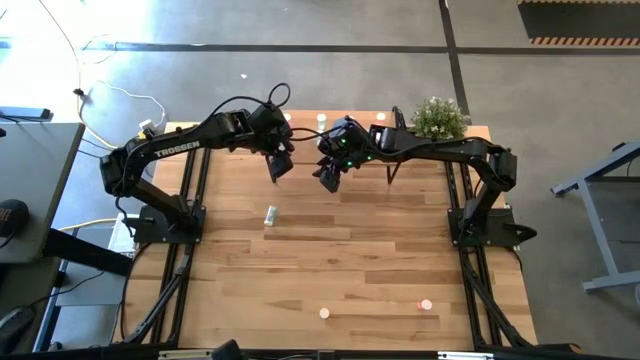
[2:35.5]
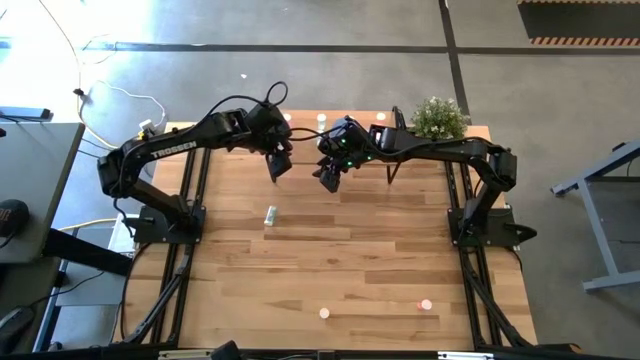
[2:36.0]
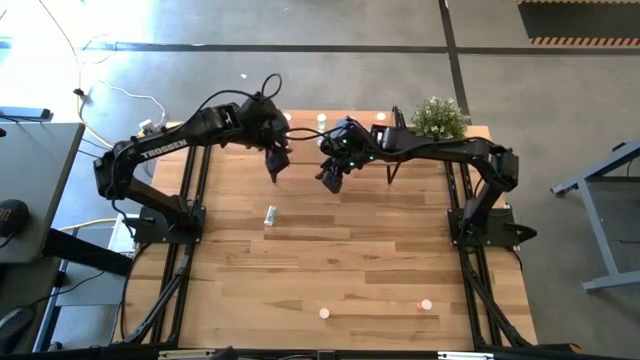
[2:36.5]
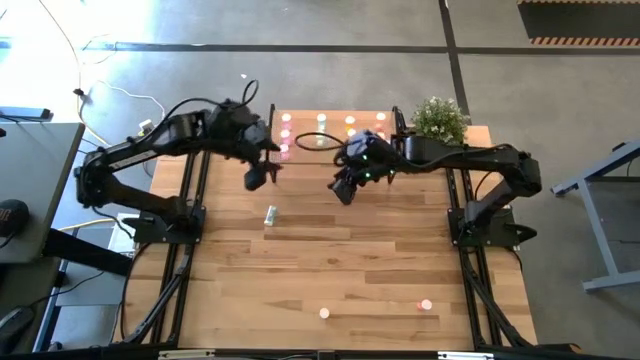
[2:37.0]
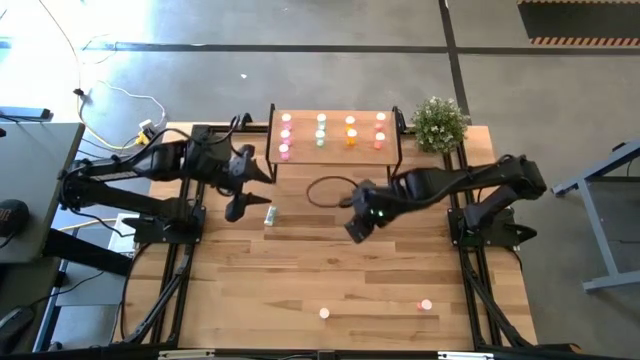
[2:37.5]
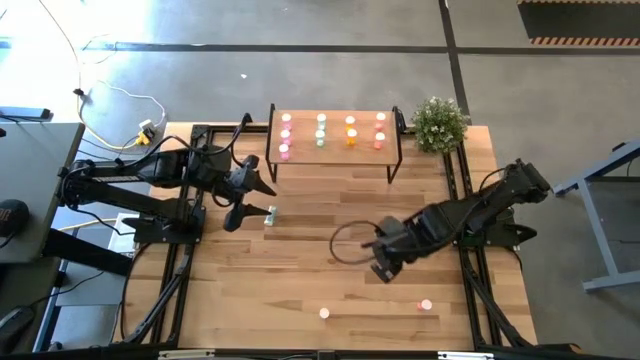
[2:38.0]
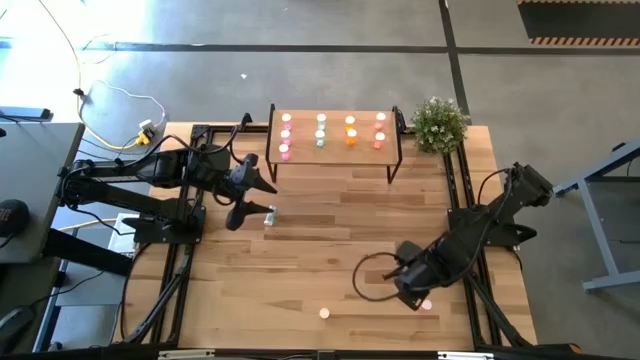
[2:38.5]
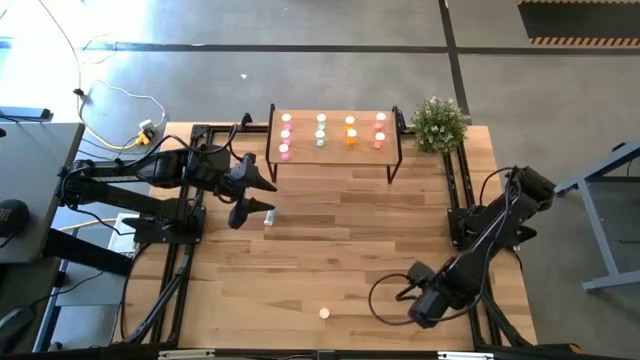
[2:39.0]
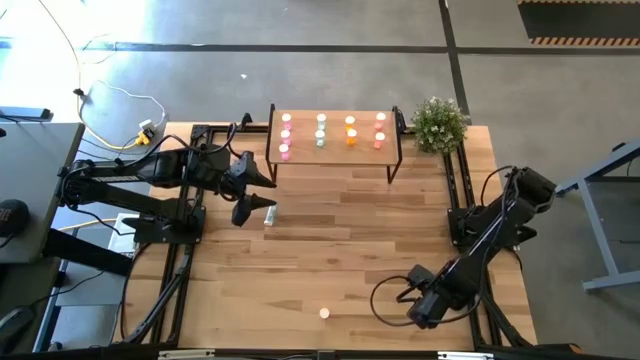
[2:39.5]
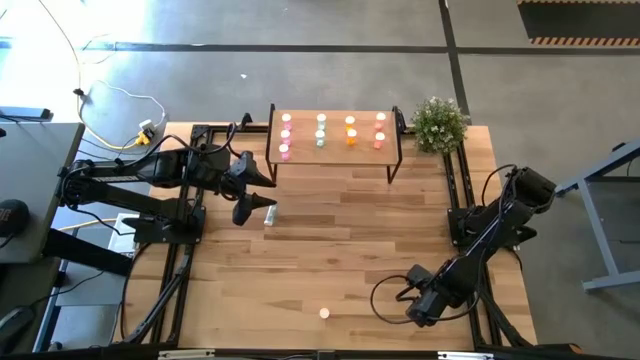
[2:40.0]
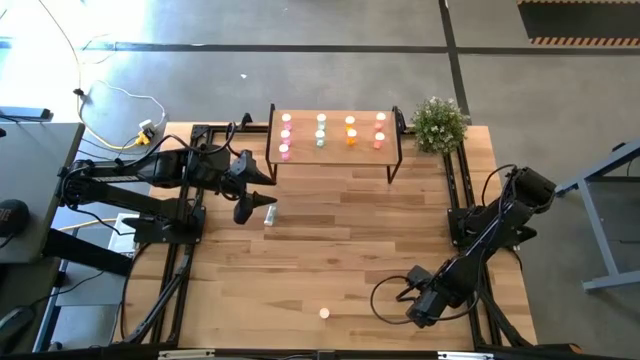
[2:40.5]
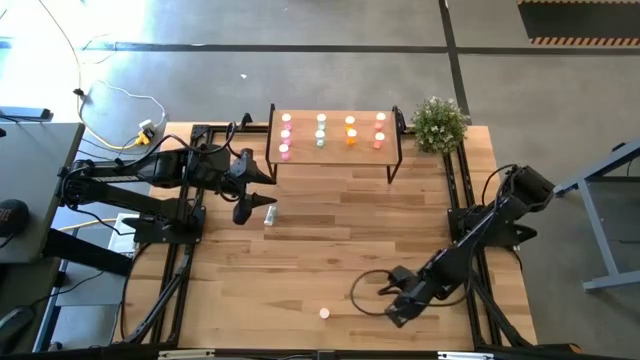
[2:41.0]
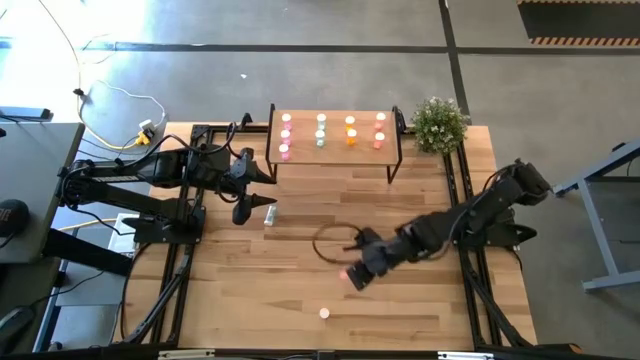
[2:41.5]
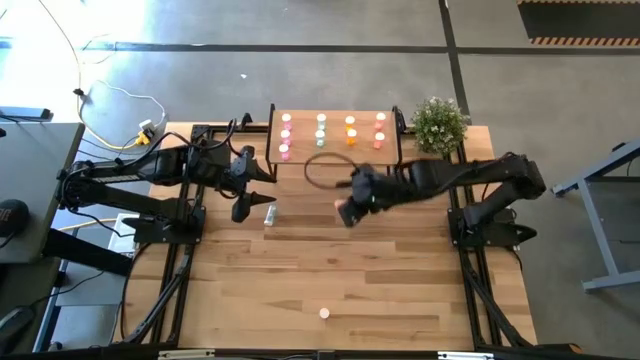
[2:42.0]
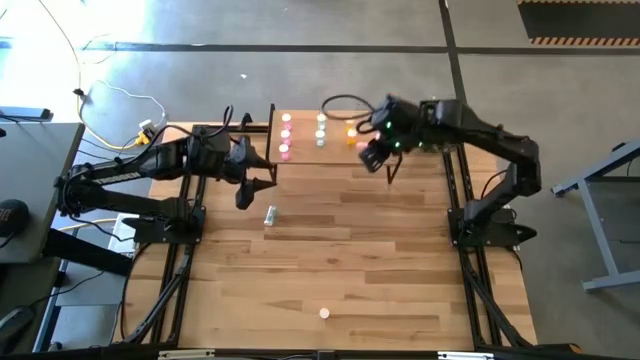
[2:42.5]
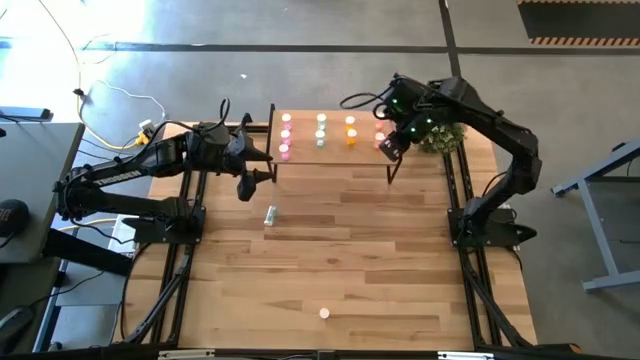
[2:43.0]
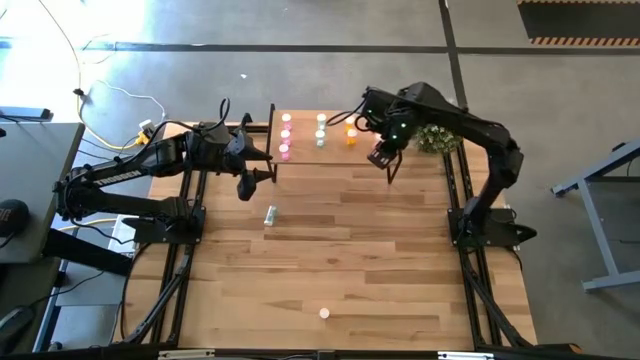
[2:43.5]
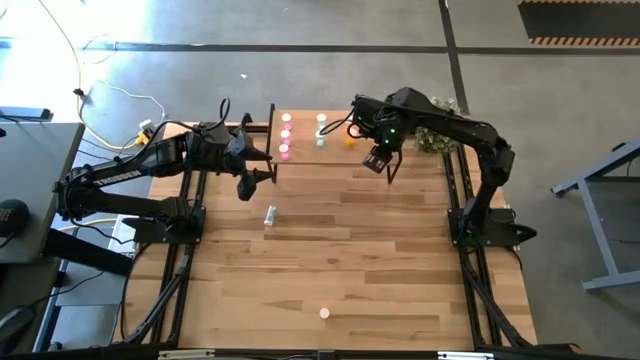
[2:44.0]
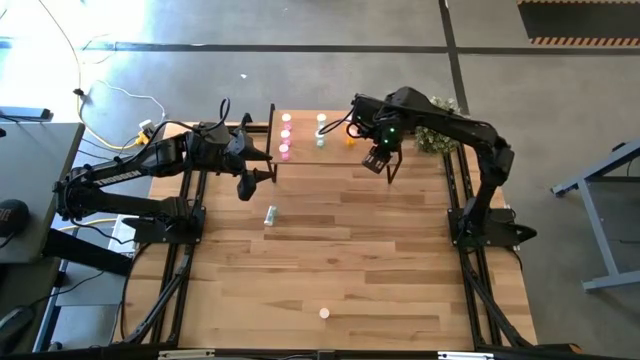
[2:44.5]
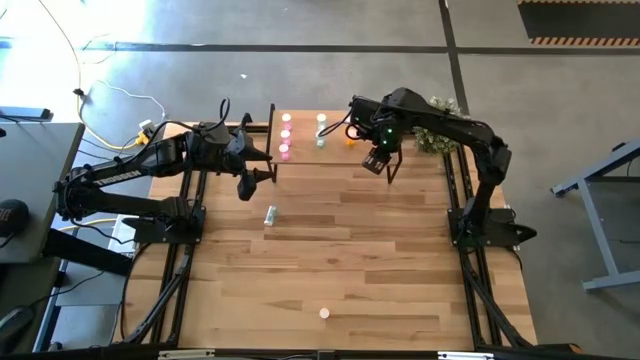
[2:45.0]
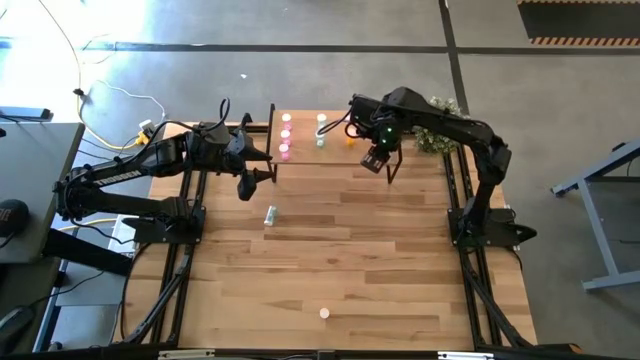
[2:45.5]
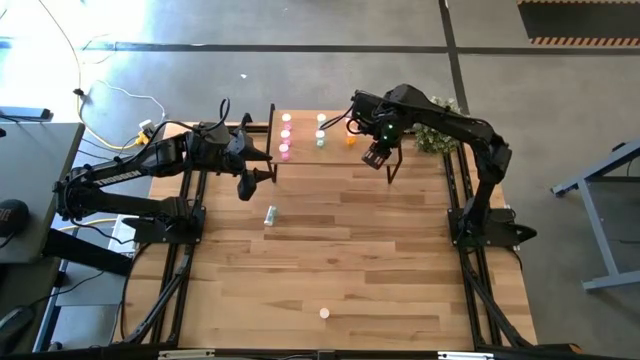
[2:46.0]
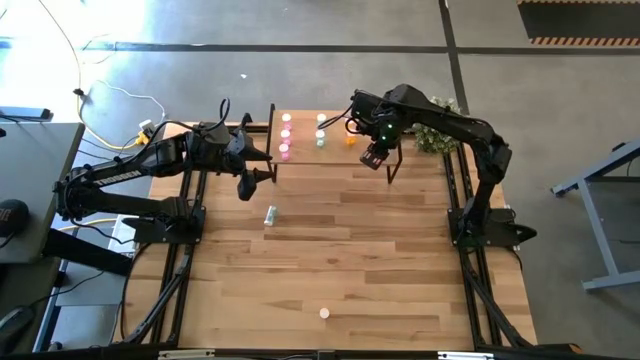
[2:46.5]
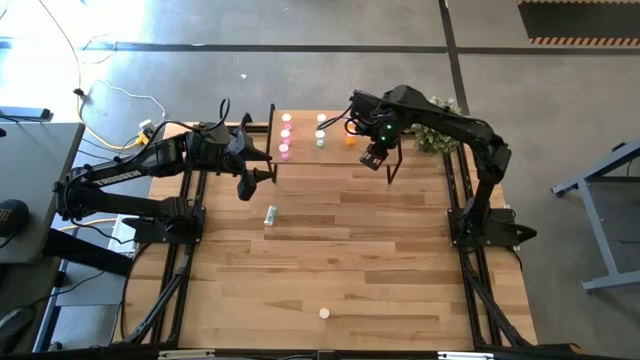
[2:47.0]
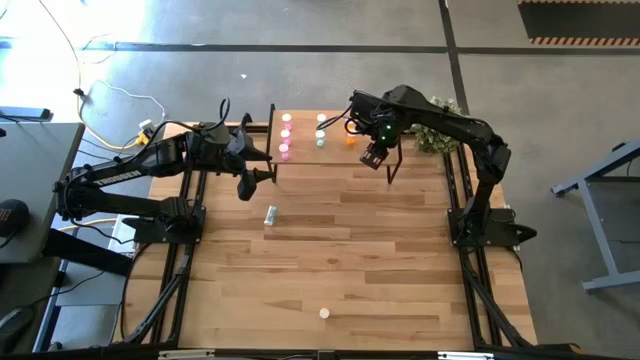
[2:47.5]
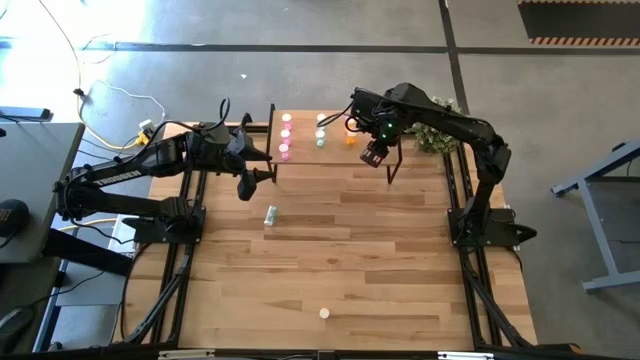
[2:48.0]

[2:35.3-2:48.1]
Task: Pick and place medicine bottles onto shelf by color
Put the orange pill bottle on the shelf aligned with the orange pill bottles

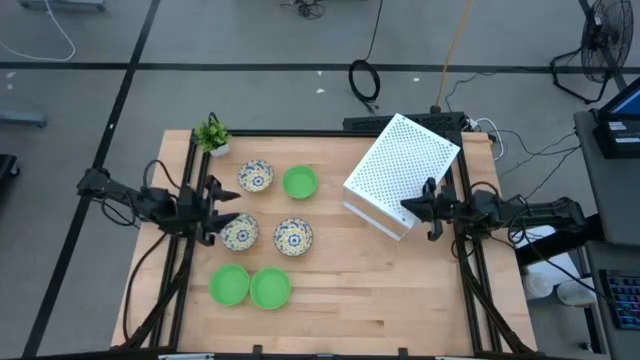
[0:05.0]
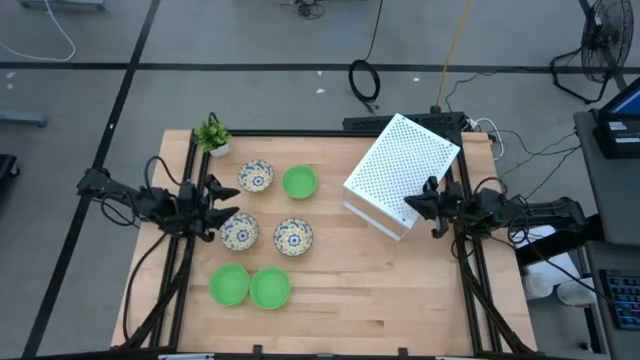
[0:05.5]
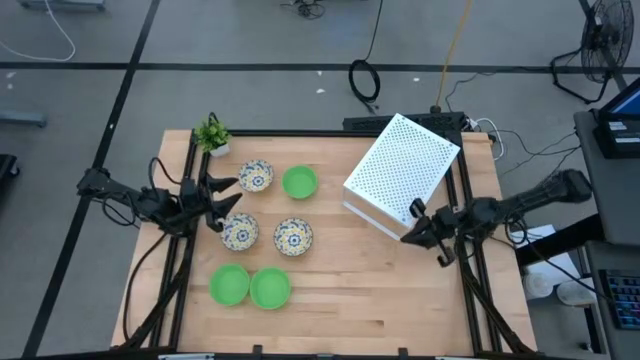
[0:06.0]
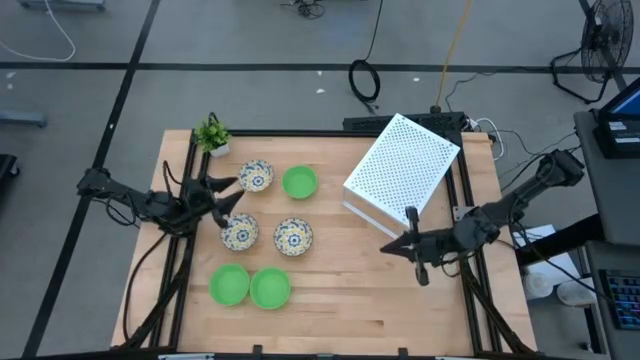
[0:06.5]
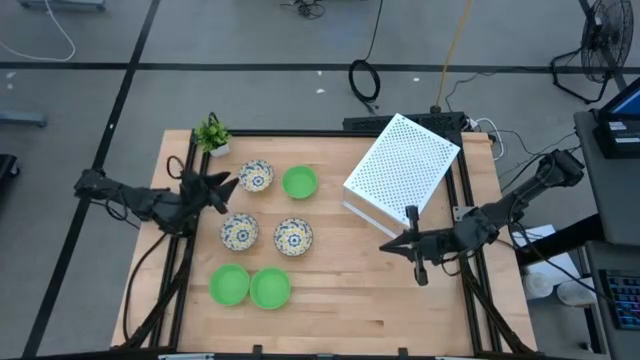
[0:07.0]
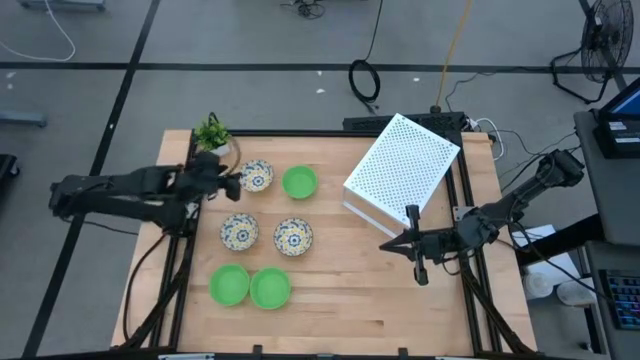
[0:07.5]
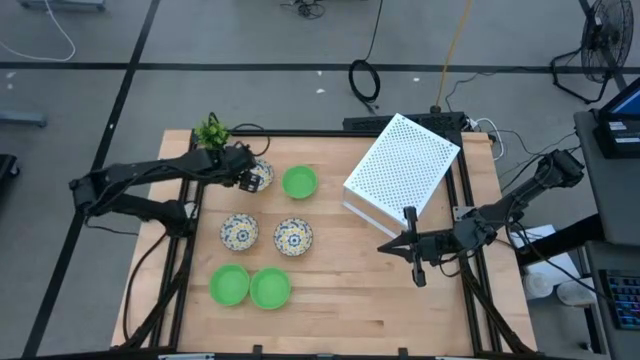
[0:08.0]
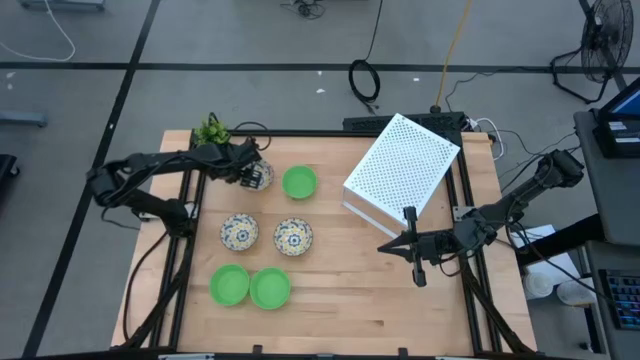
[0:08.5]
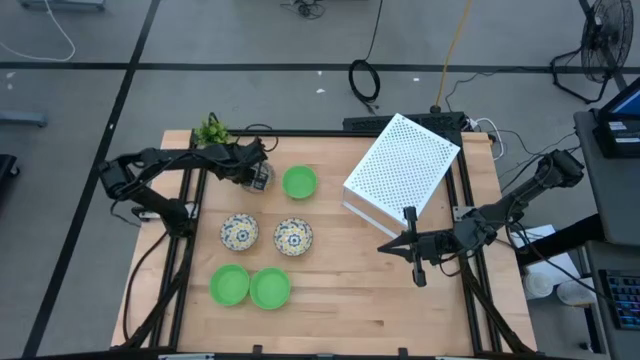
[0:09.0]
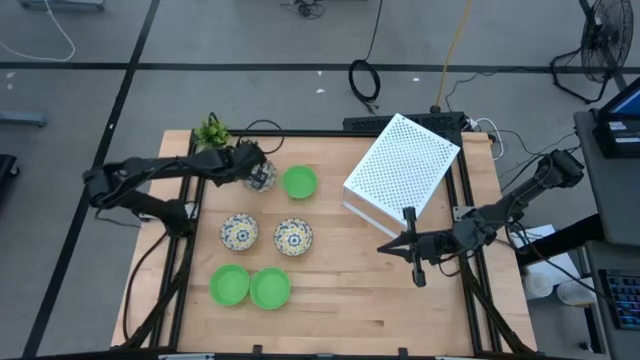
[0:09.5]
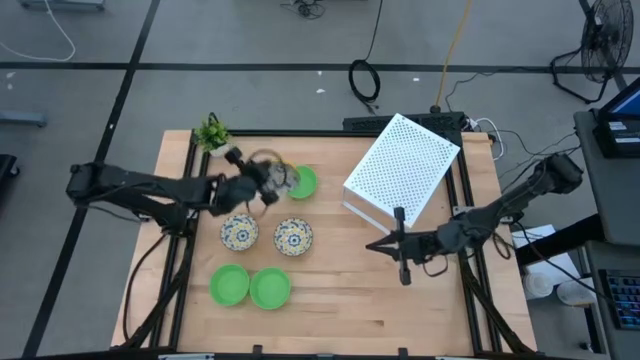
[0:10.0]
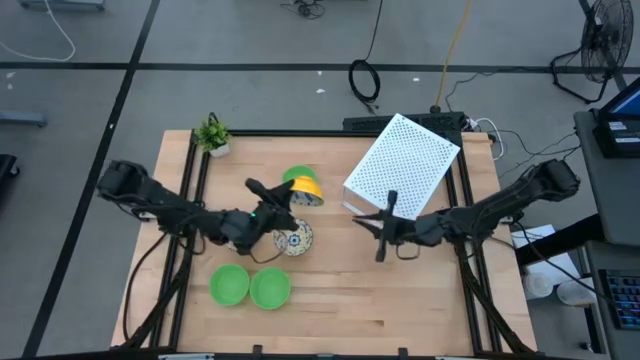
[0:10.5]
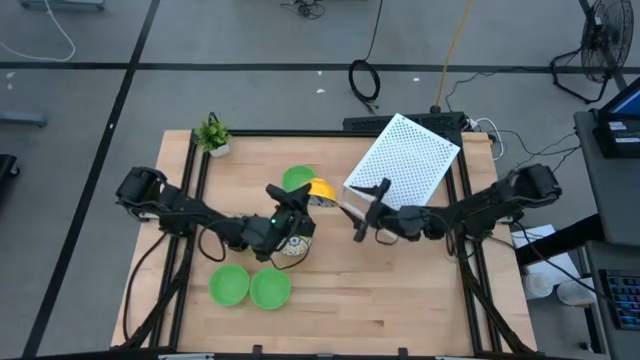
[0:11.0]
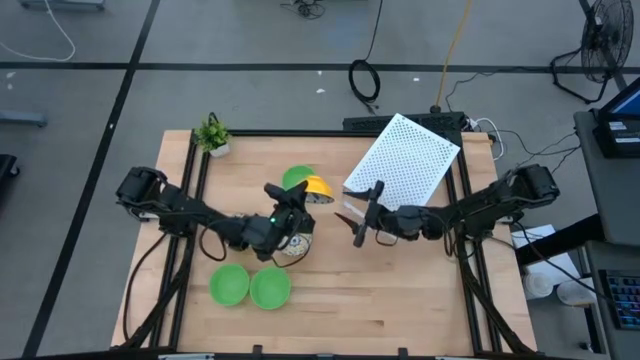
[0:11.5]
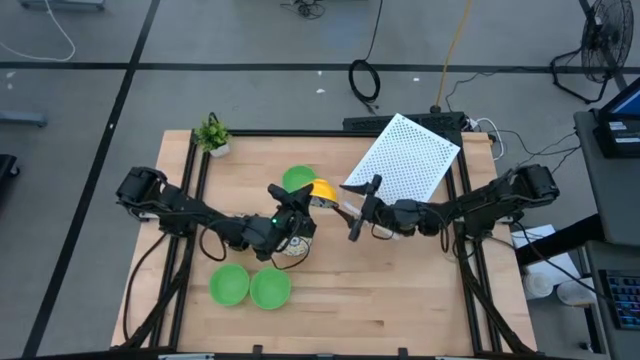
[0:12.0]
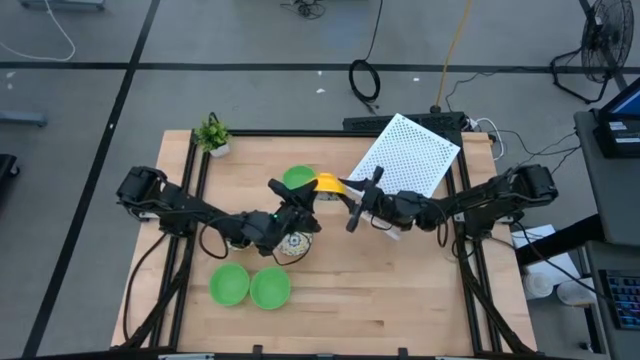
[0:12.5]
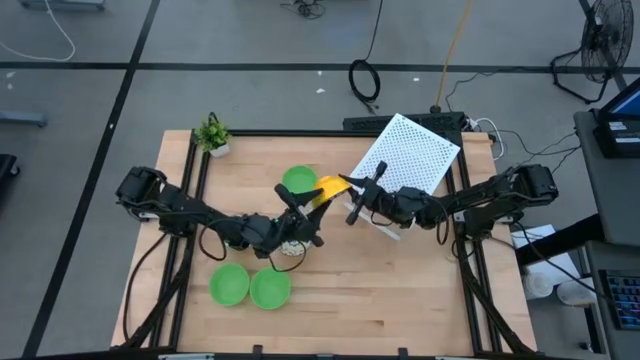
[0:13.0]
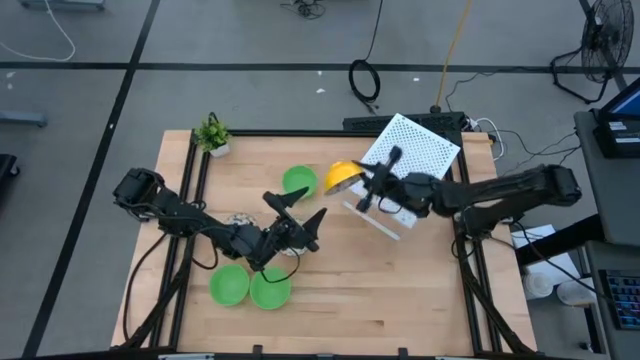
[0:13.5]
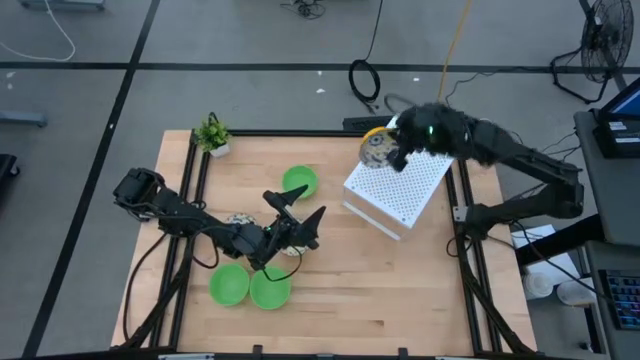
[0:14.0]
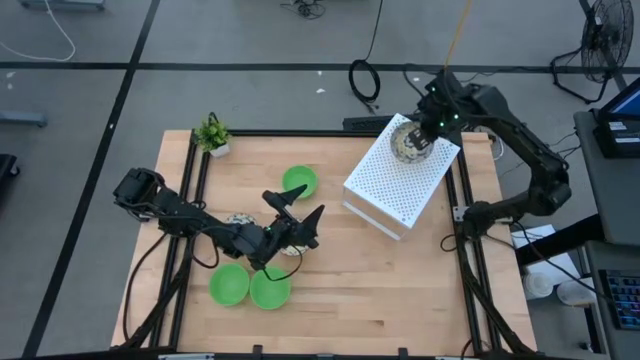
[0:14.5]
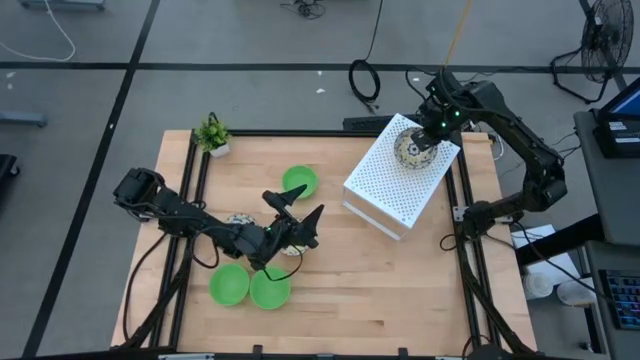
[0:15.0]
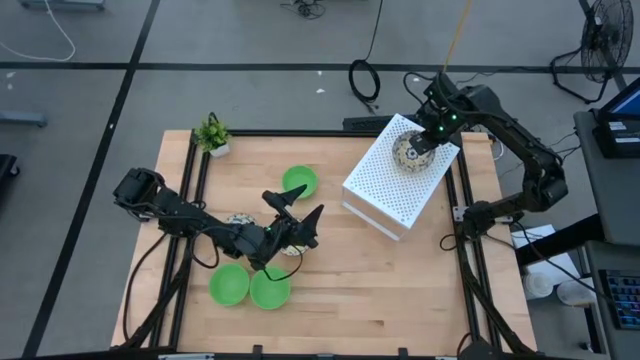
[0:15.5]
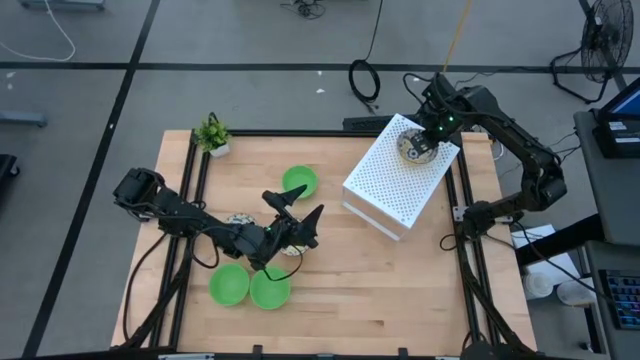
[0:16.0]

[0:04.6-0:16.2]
Task: Pick & Place Mini bowls
Put the top yellow patterned bowl on the shelf
